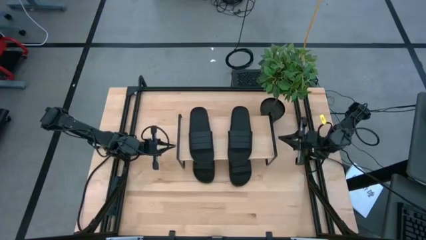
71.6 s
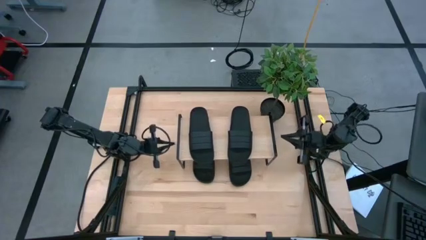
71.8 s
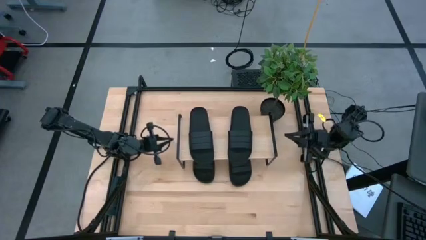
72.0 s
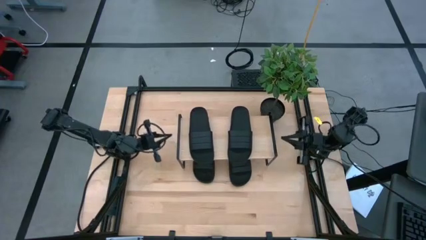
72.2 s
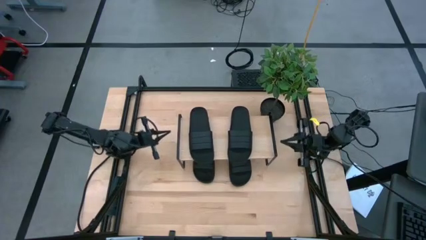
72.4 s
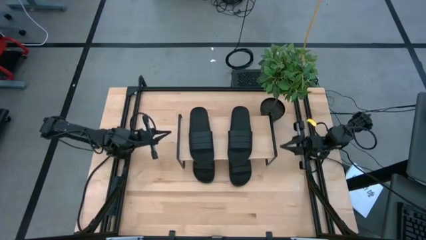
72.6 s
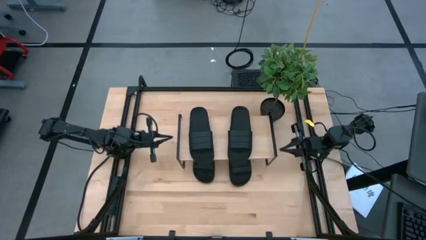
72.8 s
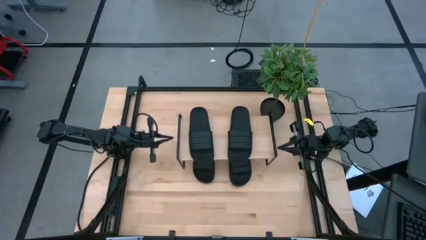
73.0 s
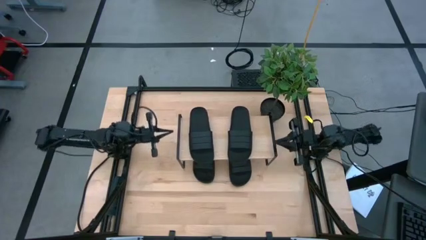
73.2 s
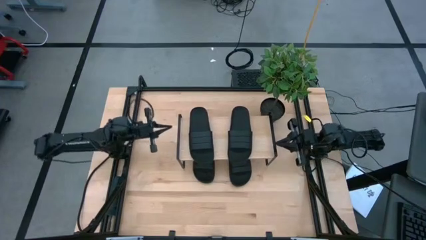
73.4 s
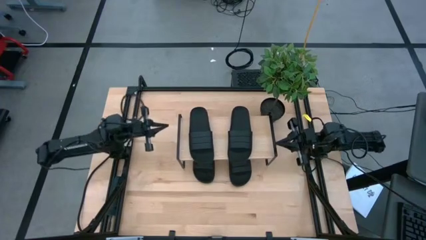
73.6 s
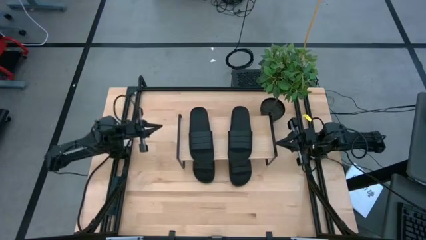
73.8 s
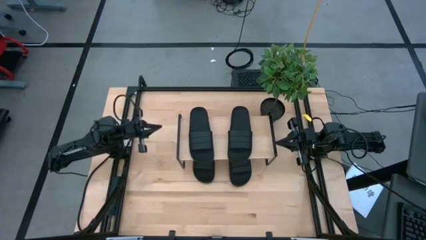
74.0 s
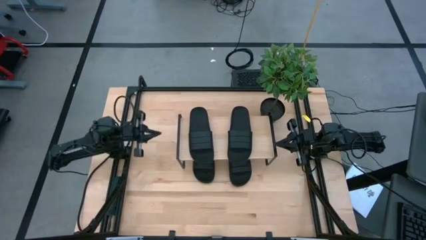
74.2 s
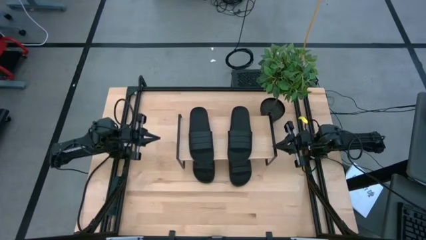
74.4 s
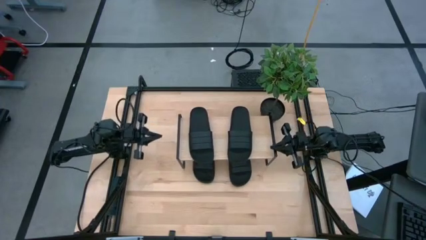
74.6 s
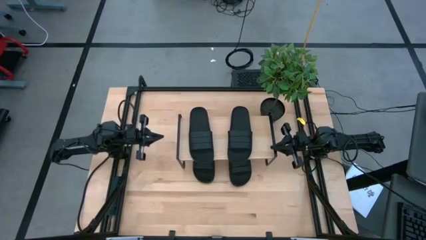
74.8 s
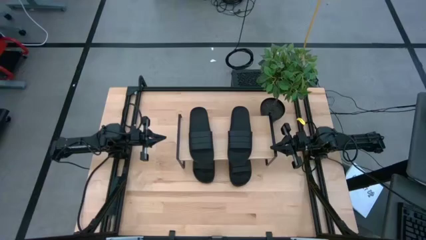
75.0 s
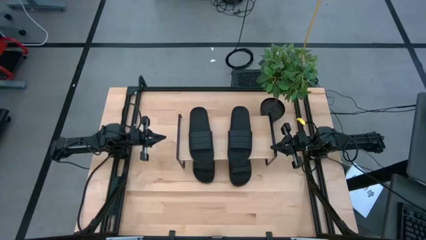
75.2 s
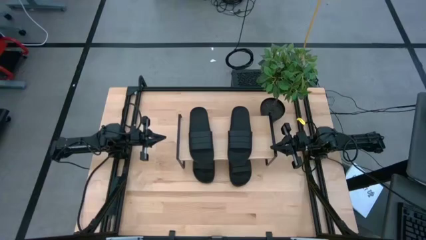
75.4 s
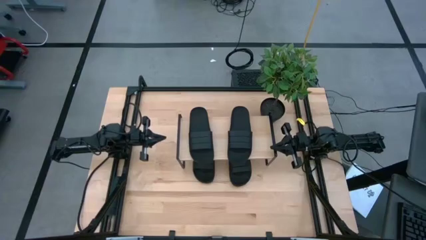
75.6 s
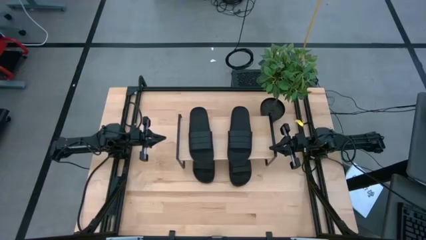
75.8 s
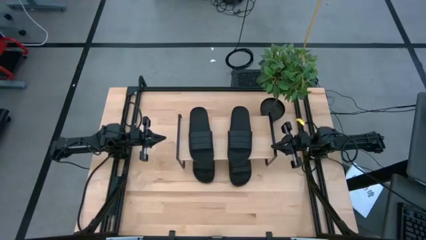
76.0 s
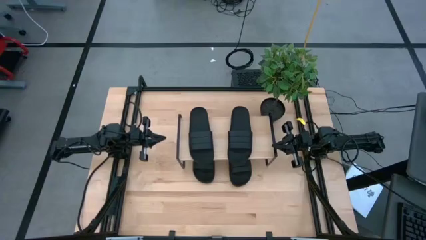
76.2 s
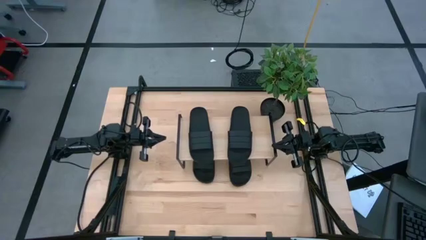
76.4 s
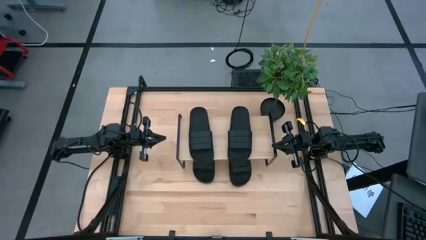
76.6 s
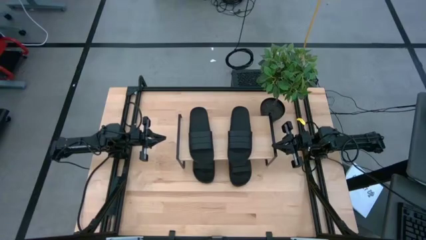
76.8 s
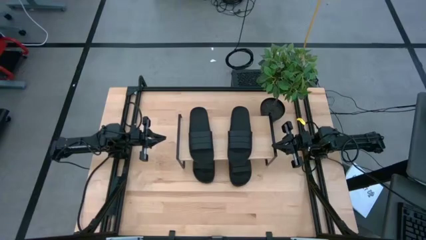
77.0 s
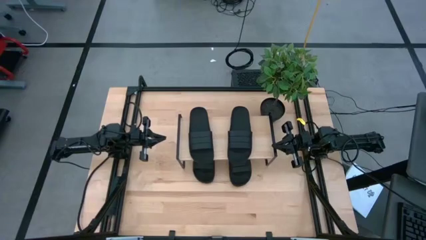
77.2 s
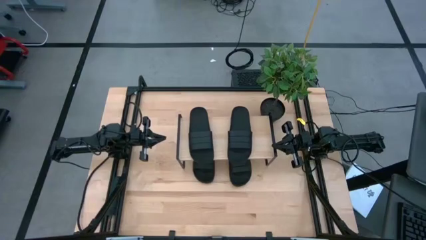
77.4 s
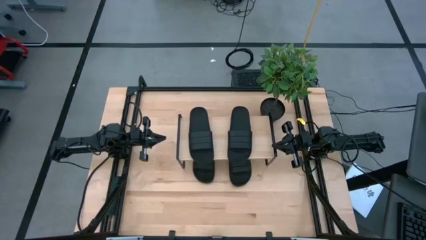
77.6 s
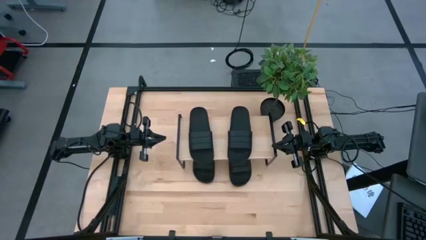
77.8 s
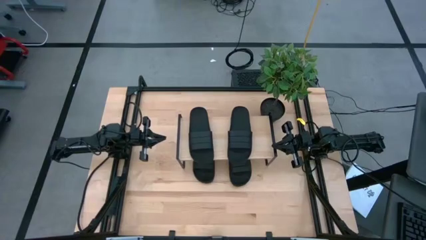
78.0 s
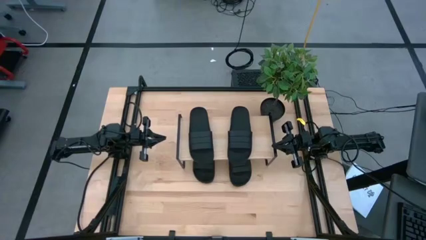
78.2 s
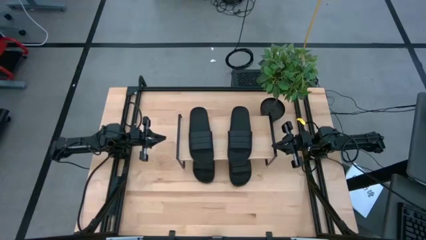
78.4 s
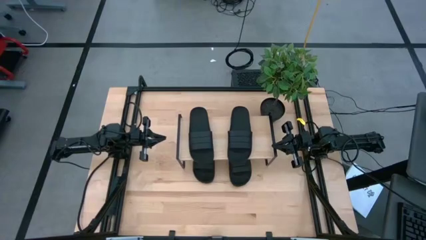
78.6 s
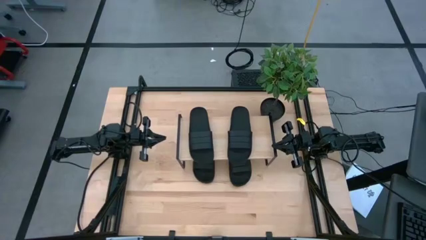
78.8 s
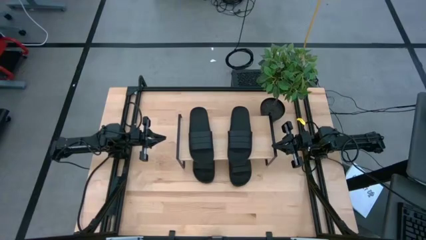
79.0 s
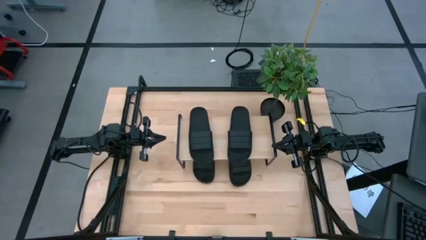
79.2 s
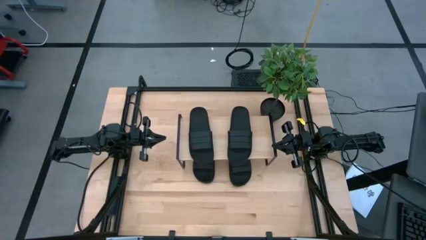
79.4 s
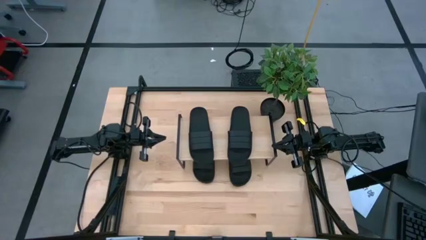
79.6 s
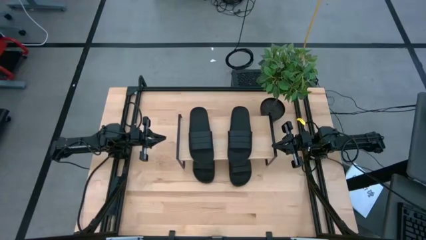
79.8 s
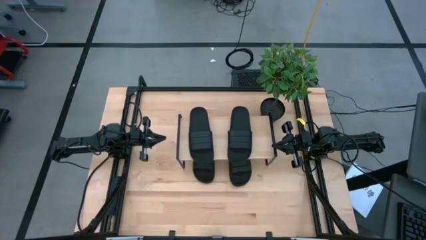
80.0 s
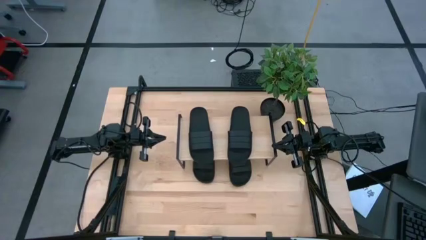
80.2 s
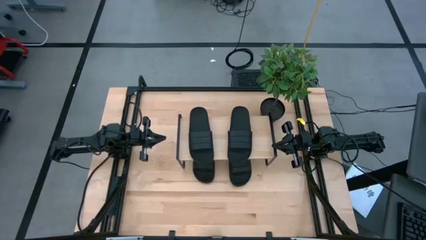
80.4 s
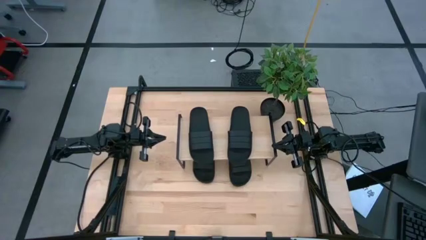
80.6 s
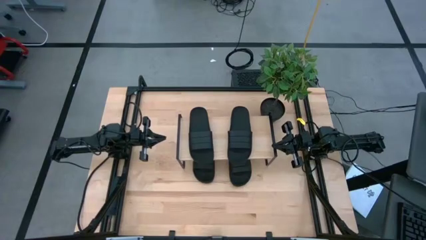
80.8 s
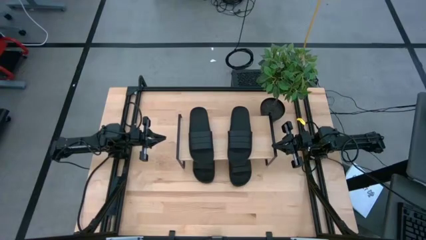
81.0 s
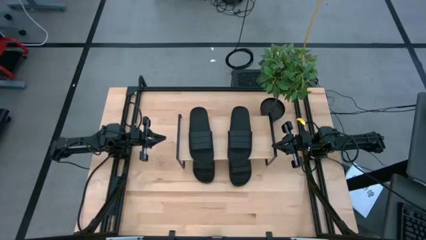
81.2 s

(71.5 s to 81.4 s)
Task: Pick and place slides into the shelf
Return to Home Position

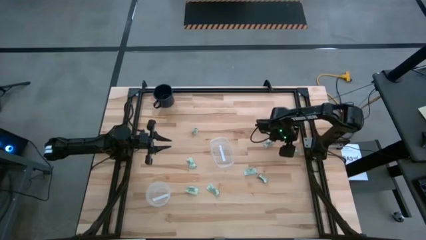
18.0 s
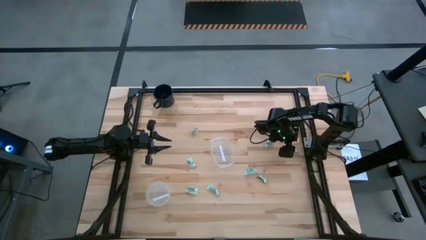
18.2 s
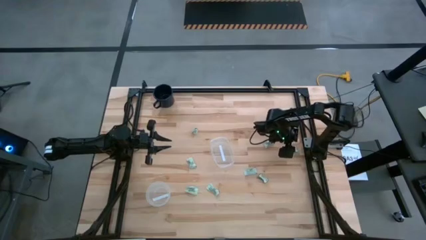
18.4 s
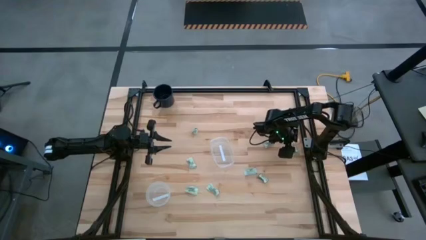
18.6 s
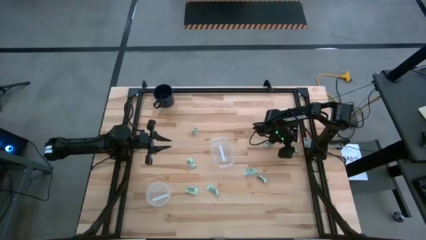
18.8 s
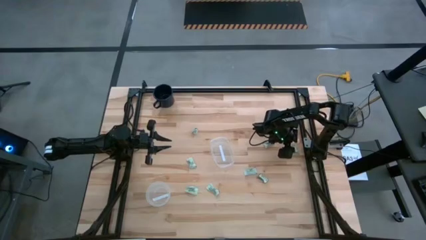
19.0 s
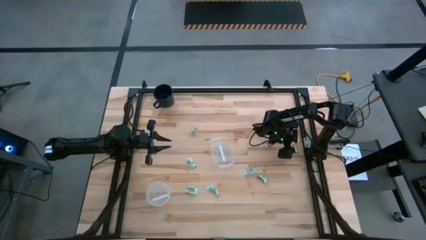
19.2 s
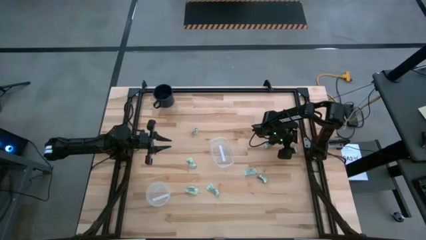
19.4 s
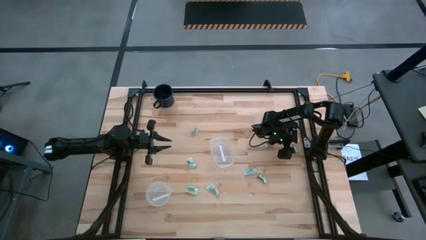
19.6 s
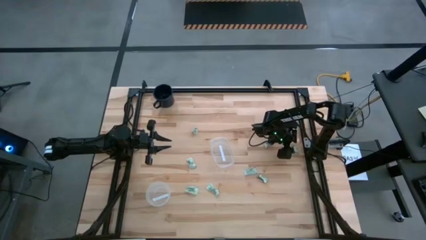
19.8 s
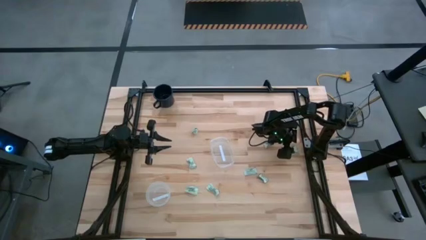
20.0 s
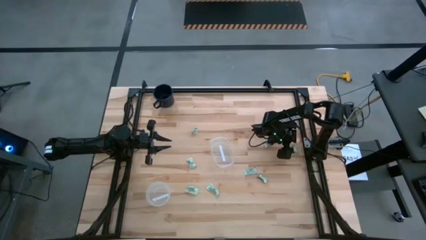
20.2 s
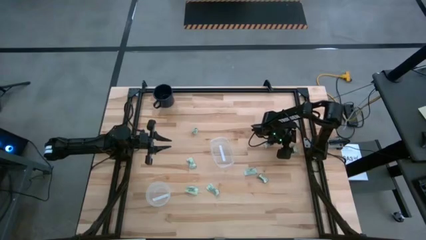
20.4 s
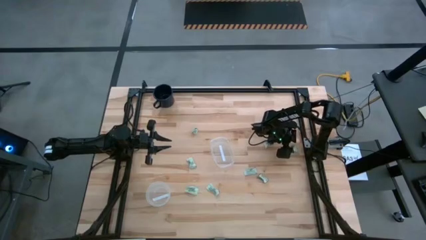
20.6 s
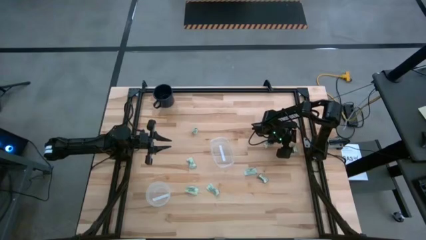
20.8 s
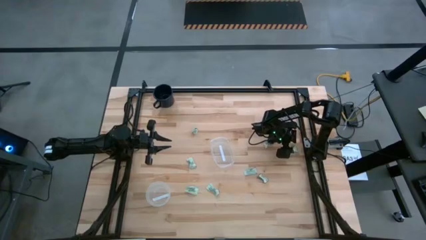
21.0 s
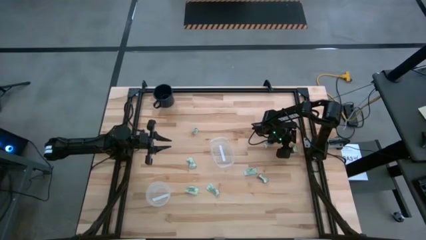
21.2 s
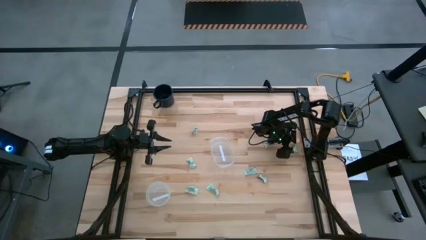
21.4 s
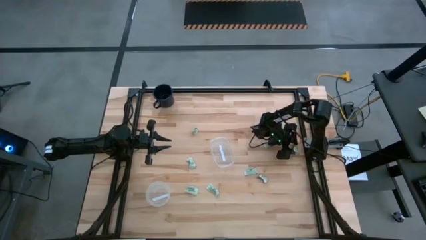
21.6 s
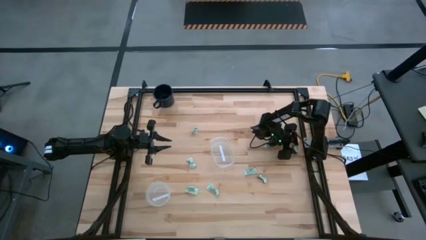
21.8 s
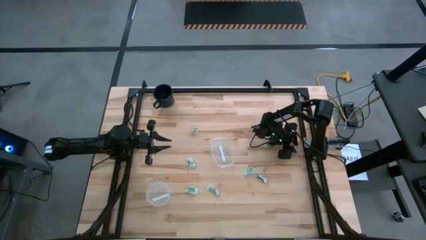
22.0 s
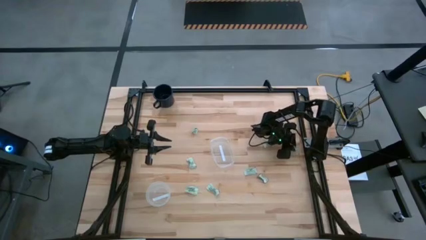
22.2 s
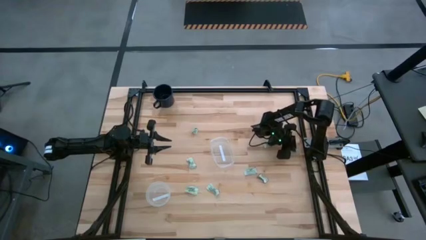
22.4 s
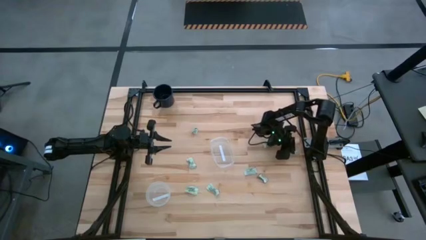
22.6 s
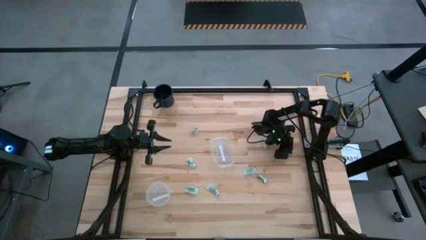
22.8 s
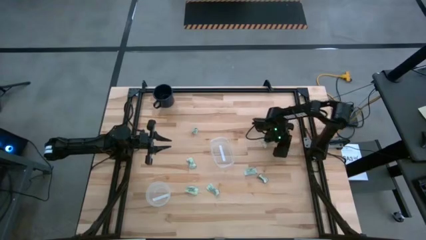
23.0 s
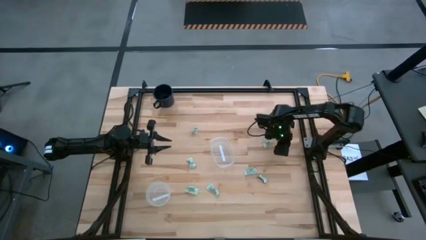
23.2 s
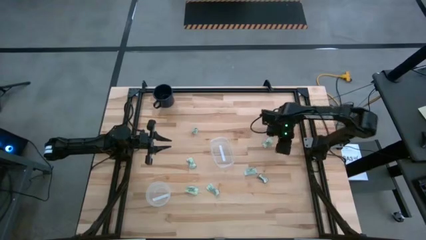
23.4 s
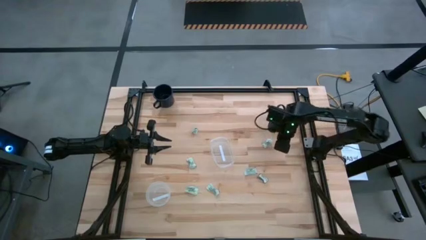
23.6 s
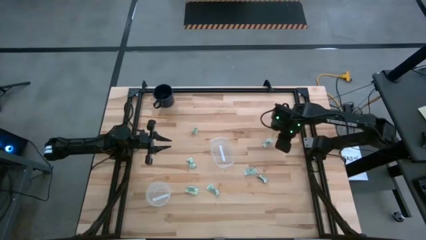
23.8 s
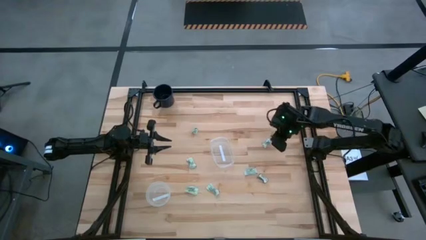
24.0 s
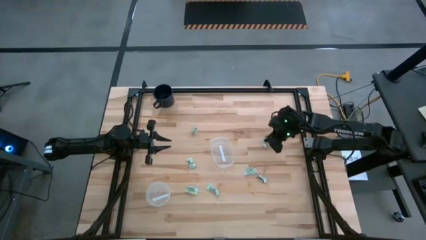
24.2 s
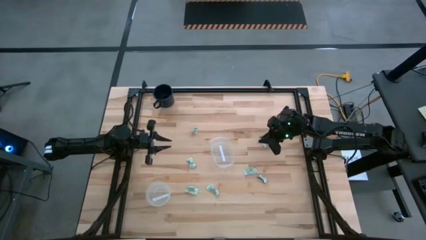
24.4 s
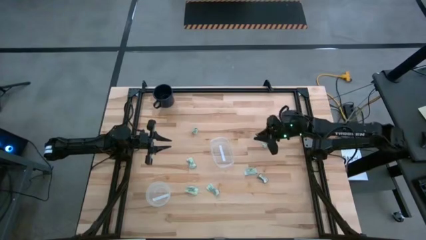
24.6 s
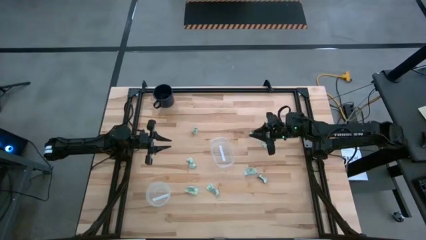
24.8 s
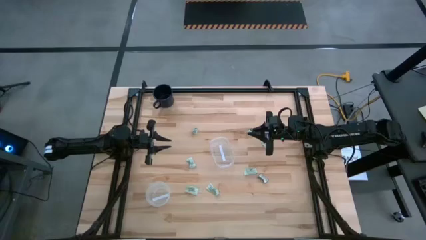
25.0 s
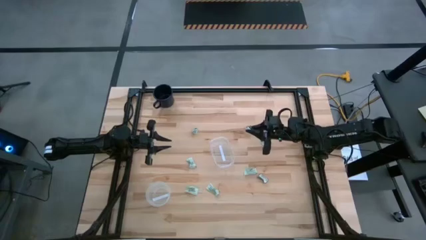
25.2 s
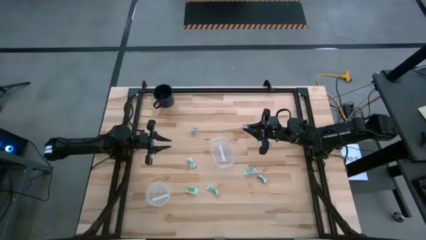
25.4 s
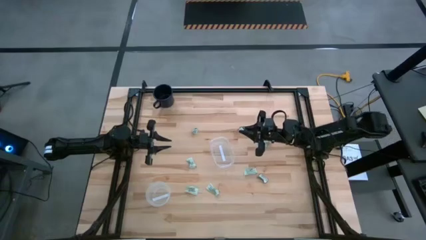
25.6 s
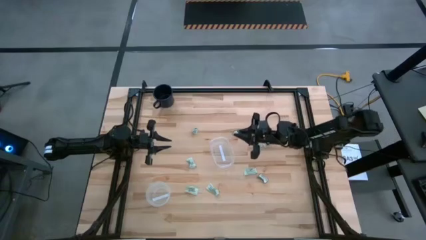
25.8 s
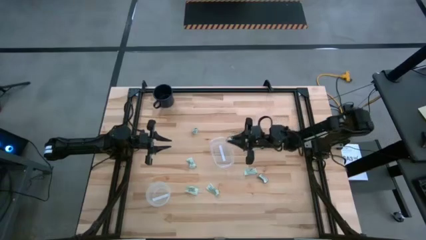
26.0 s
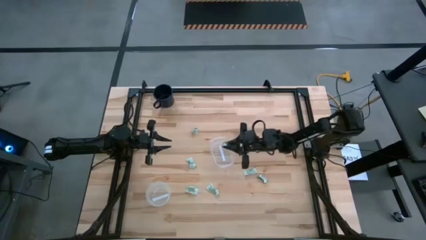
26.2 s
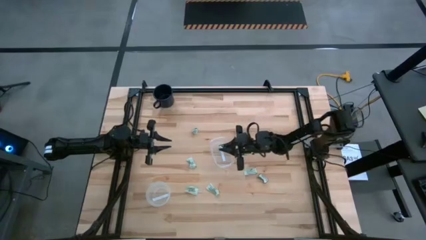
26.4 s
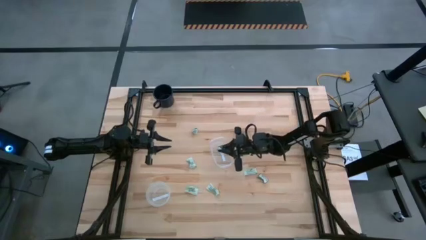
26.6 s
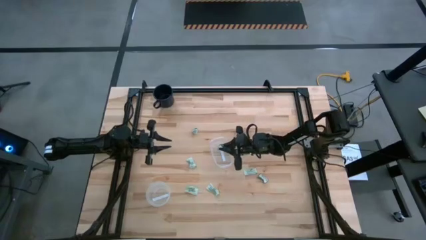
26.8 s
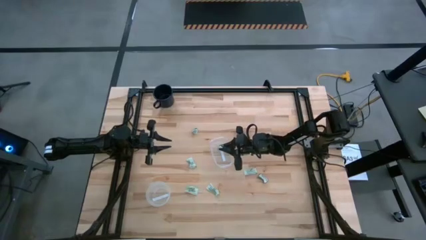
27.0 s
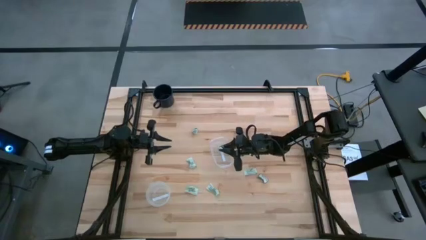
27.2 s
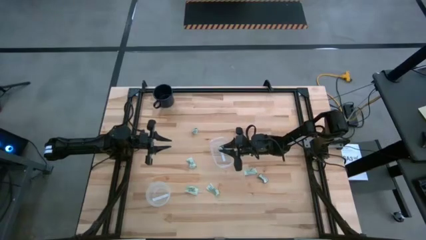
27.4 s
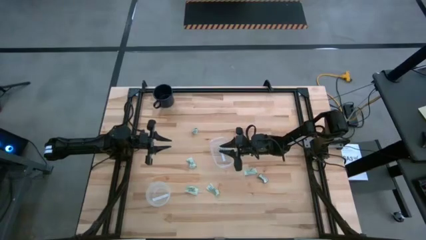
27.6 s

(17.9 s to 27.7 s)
Task: Pick and place items into bin
Put the stevia packet into the transparent bin
